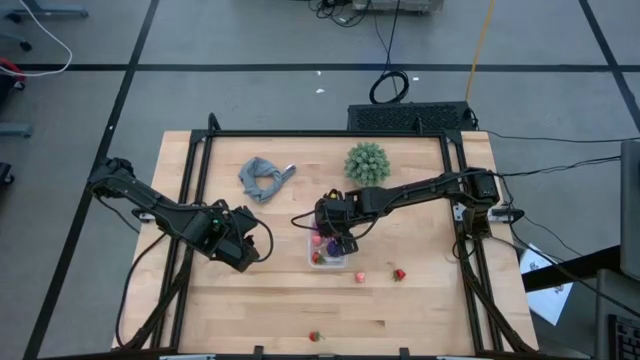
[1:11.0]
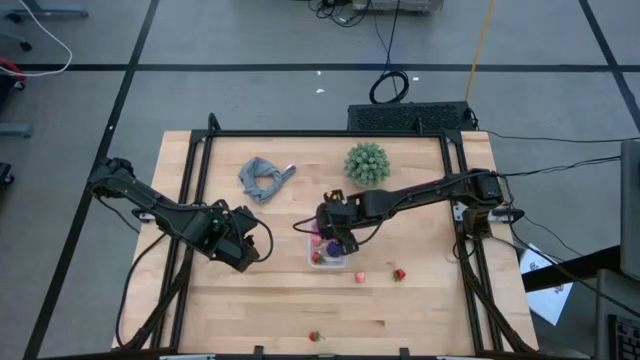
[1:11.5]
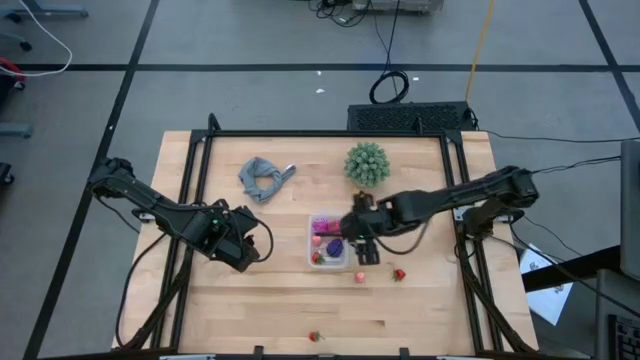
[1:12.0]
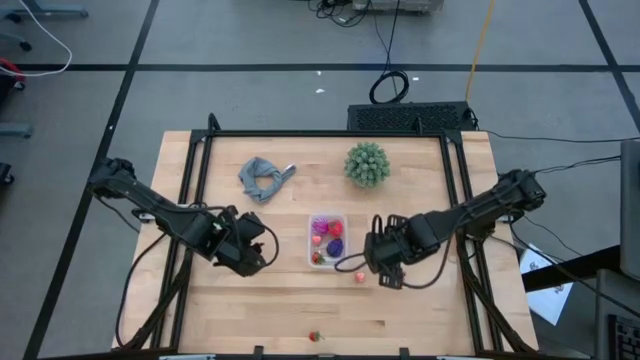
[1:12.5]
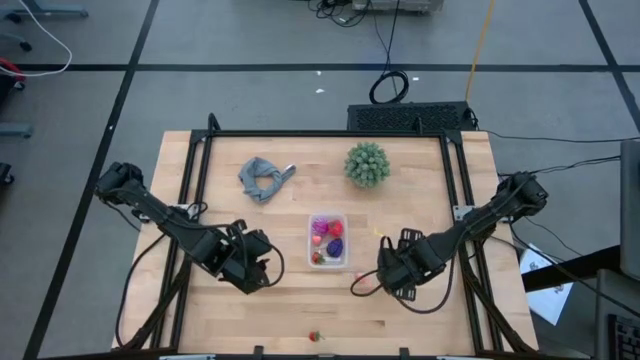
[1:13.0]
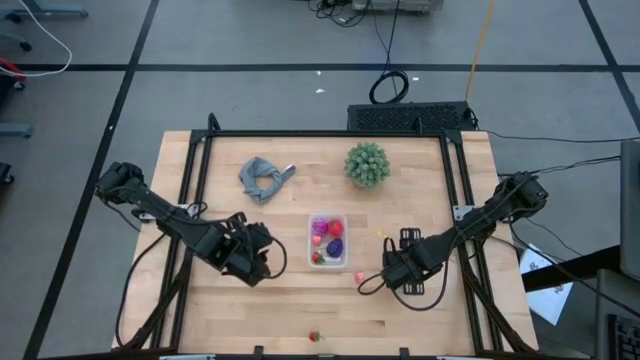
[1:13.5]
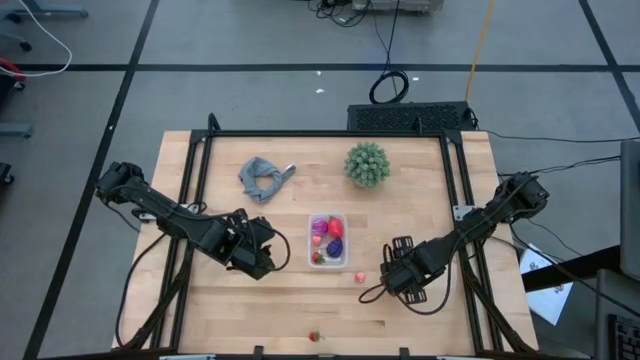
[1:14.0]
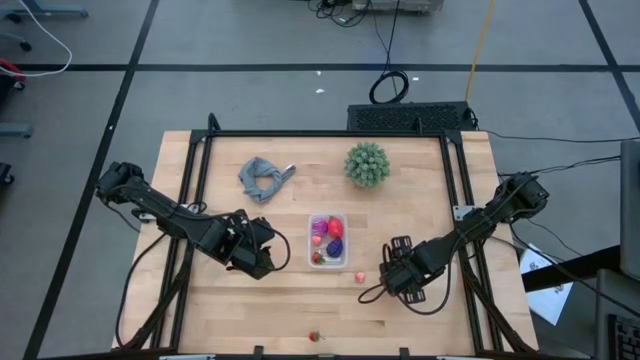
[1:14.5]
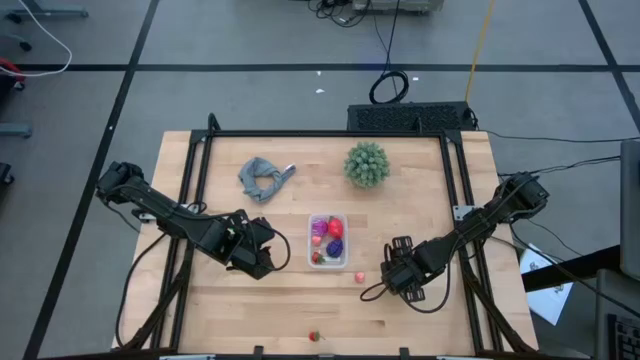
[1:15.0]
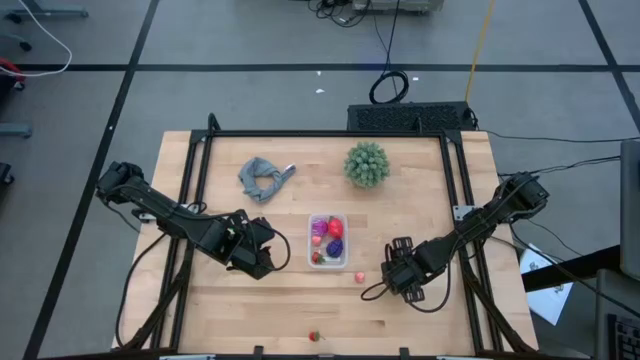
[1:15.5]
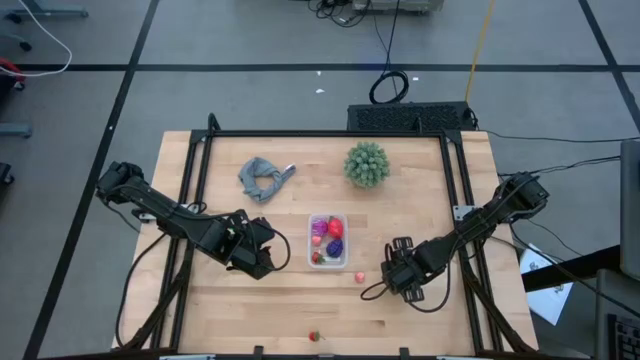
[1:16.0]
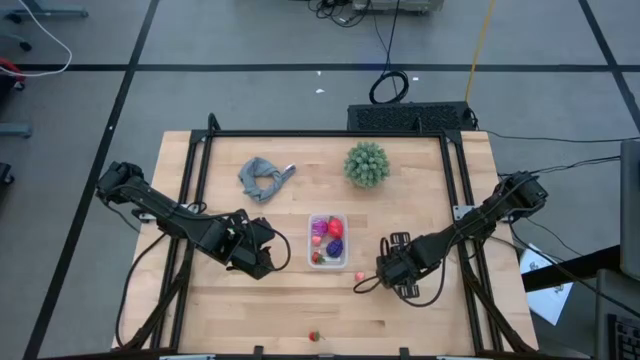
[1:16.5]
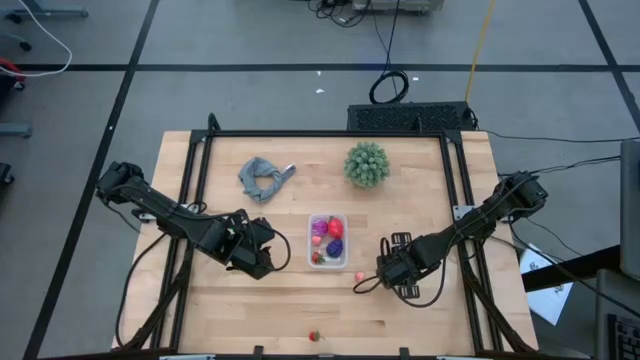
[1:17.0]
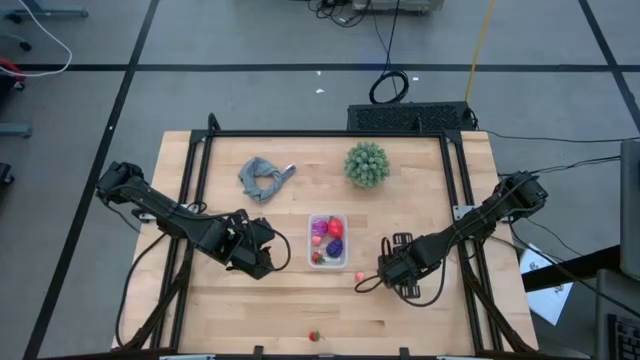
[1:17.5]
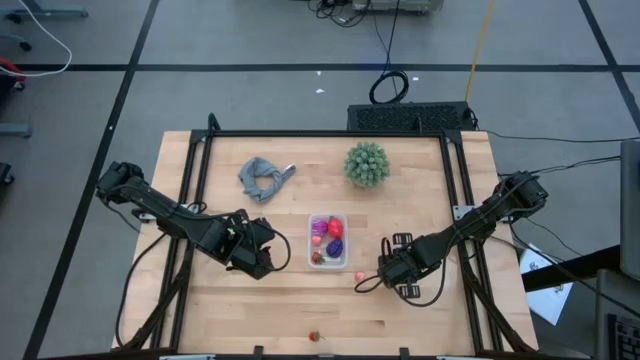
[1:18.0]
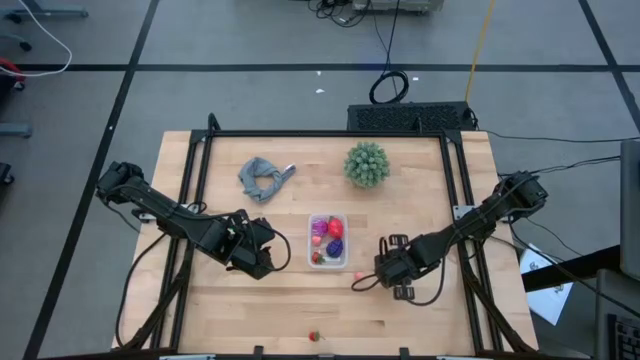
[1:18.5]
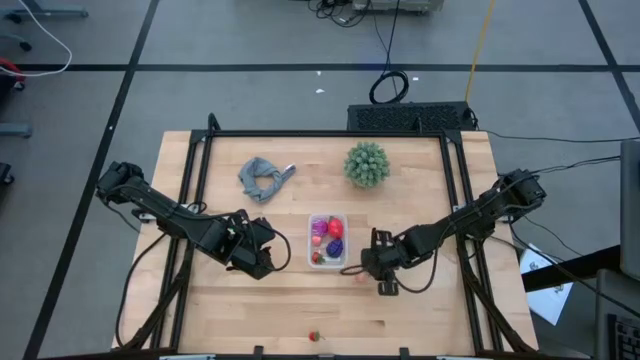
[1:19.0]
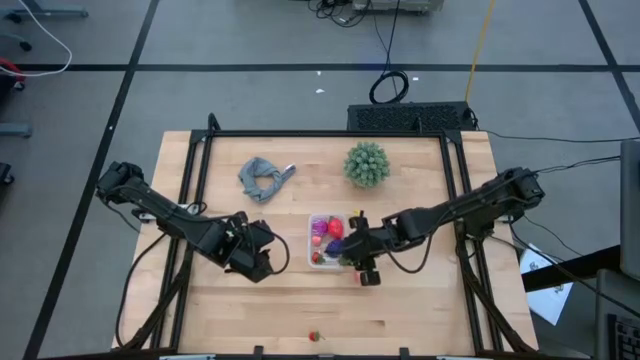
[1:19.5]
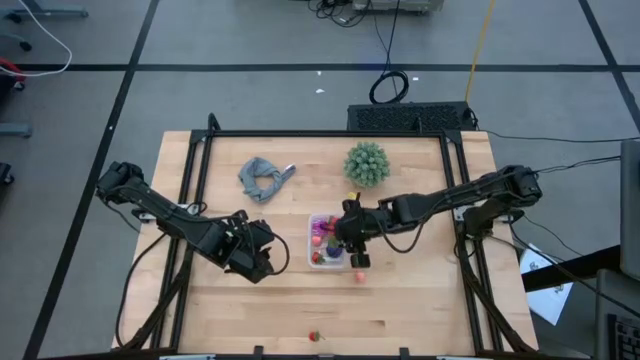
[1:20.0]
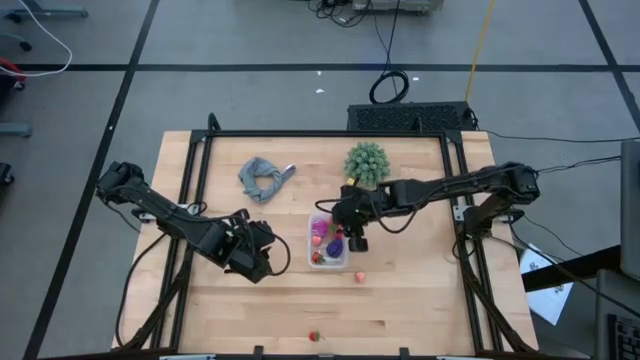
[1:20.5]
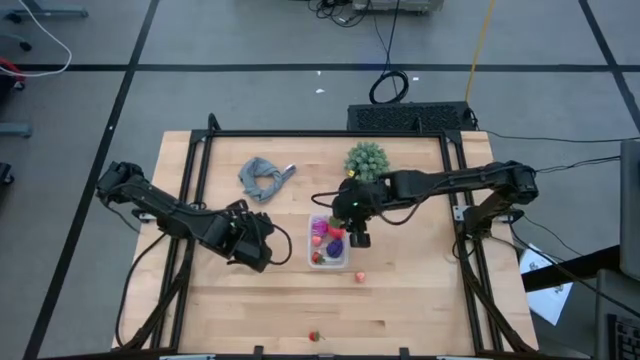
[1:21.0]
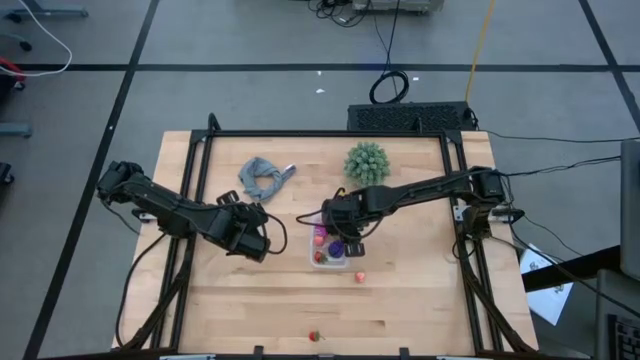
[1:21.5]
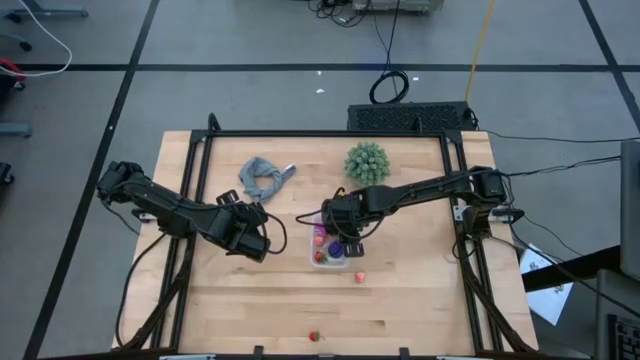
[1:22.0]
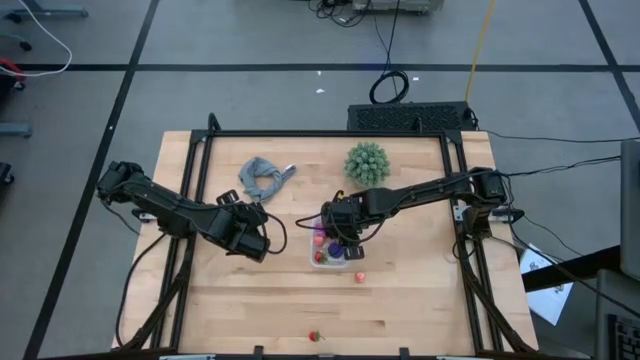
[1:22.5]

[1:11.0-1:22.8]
Task: Pick and placing Produce into tupperware
Put the top strawberry into the transparent bin

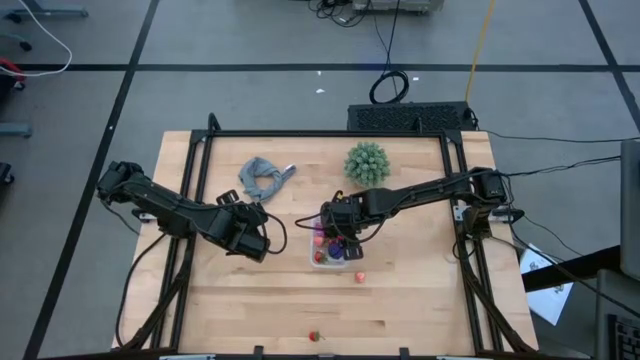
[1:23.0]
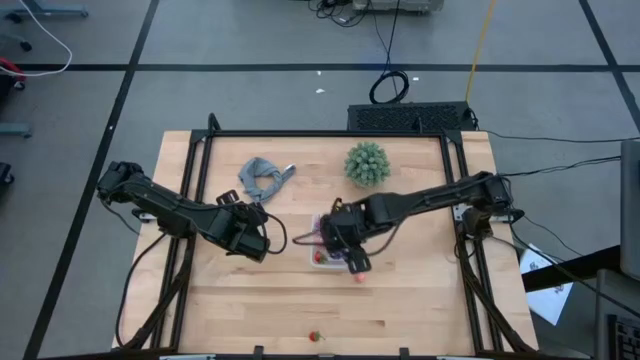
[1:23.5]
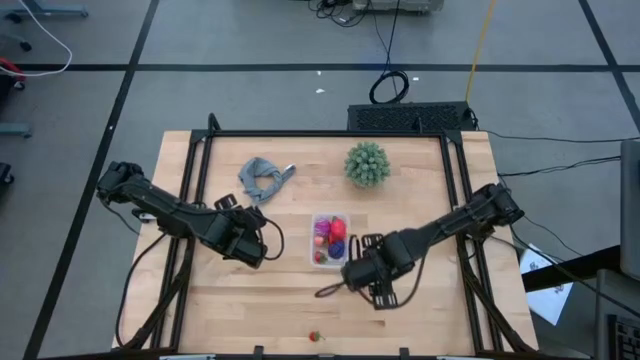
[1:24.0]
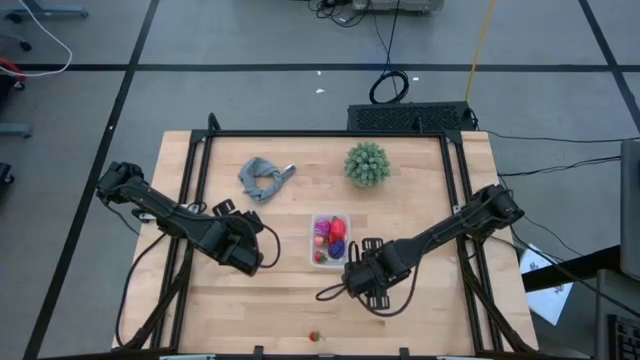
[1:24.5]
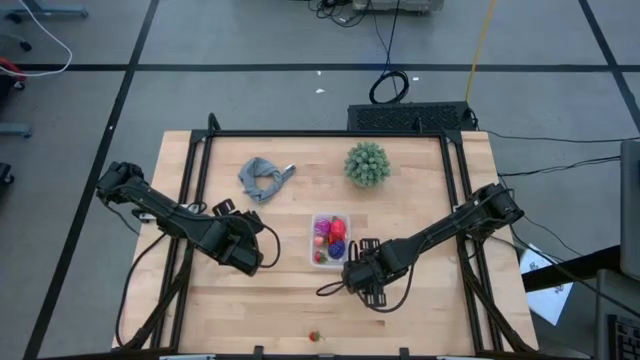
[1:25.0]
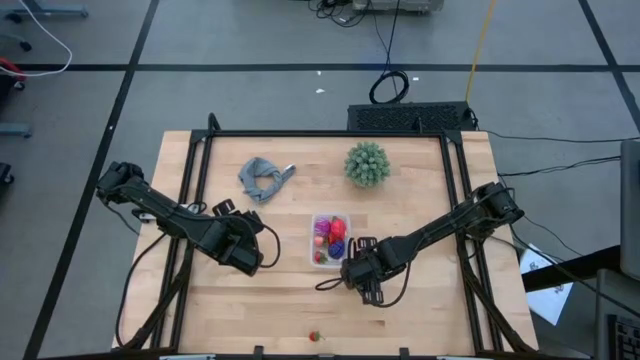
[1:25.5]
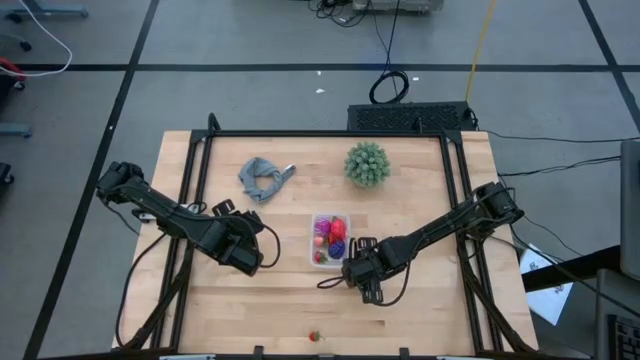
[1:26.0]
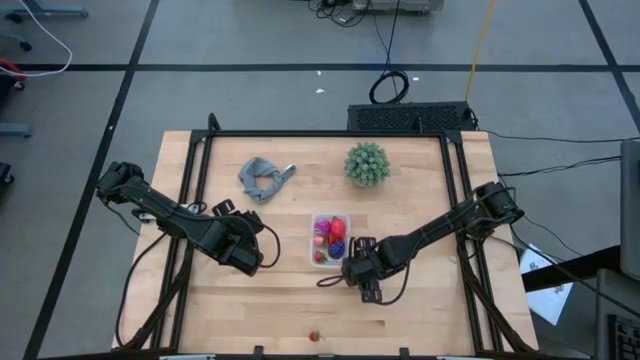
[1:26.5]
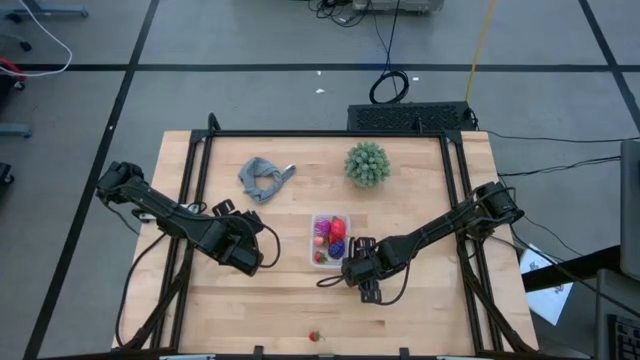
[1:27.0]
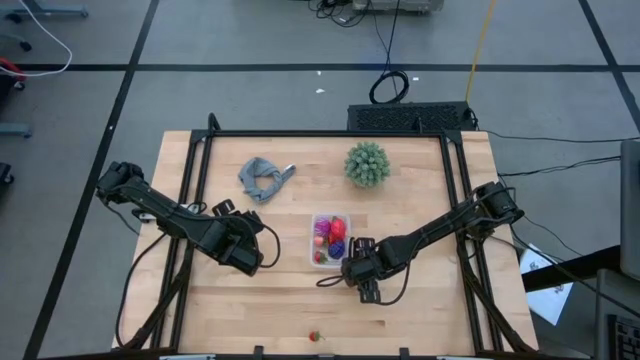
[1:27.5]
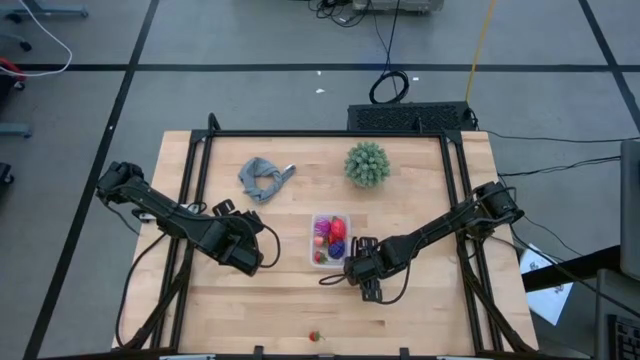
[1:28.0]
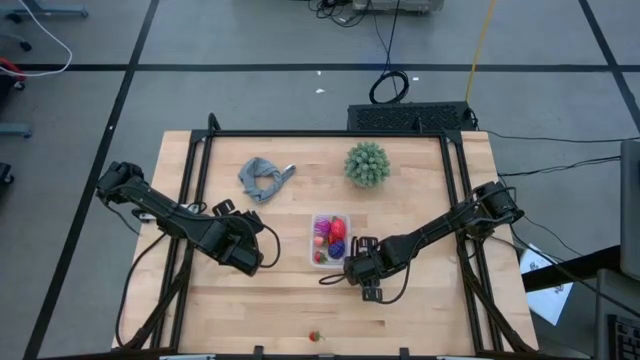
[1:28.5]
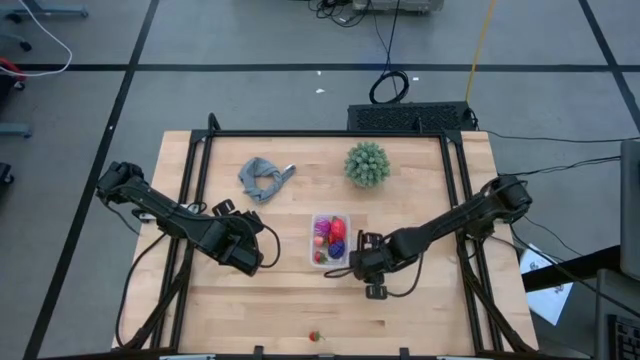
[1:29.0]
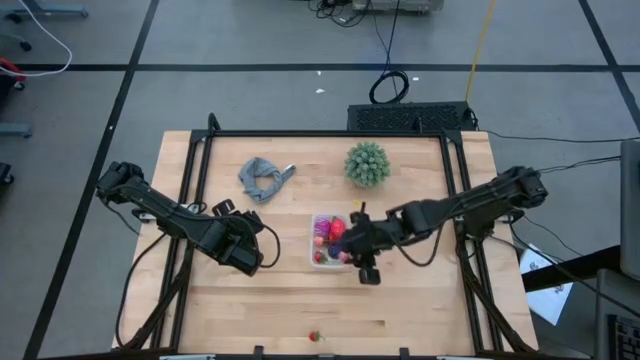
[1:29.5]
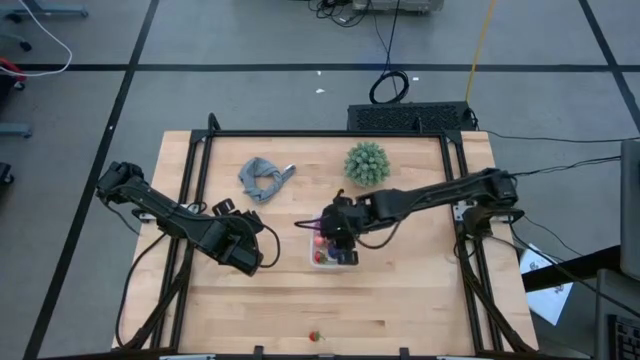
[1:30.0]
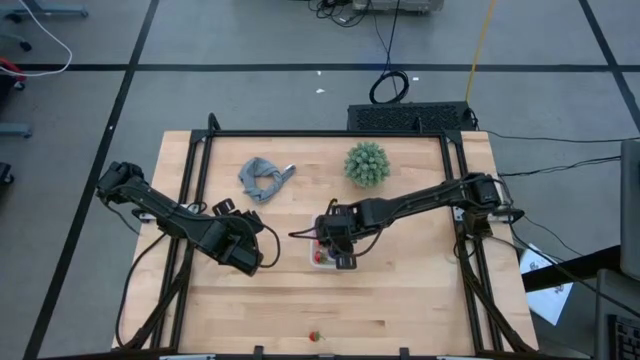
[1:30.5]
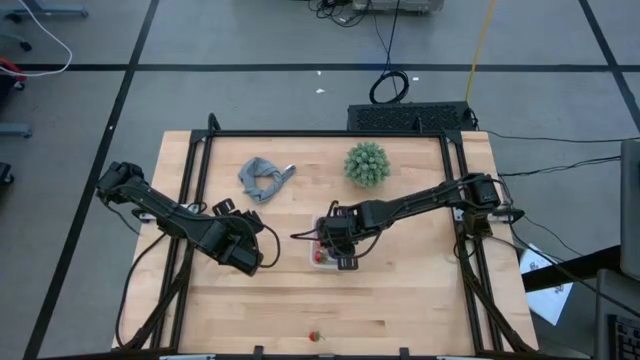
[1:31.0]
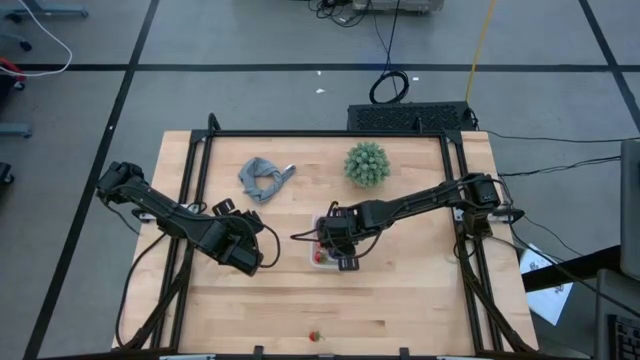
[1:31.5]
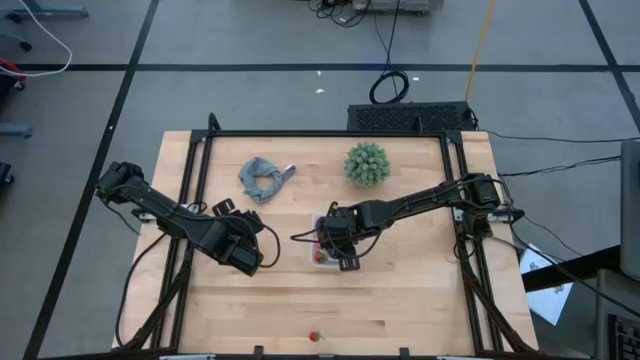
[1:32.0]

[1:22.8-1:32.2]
Put the apricot into the transparent bin
